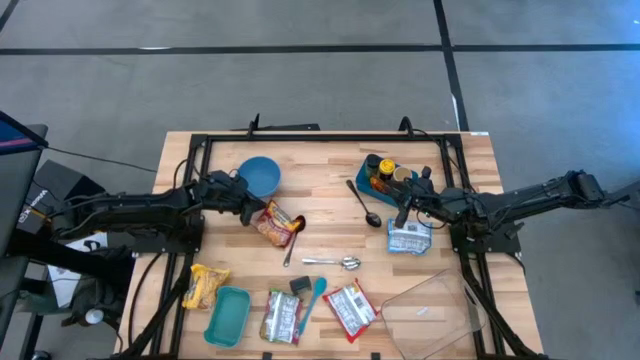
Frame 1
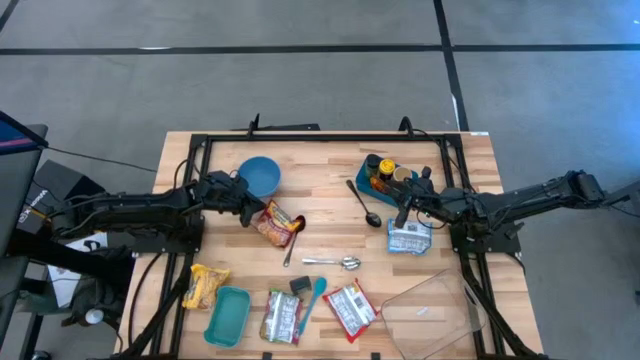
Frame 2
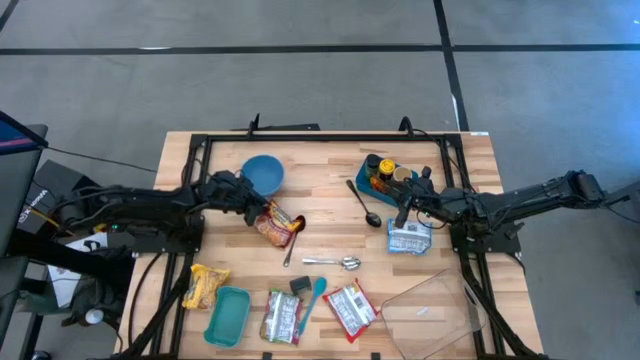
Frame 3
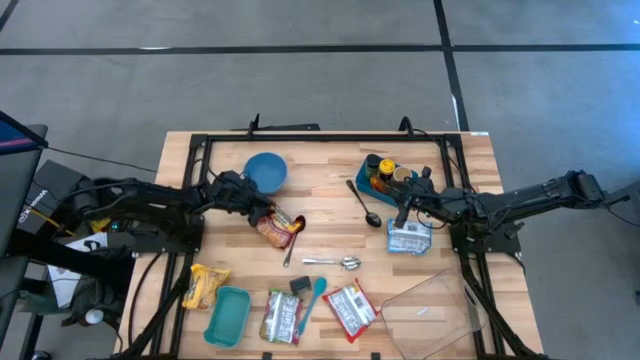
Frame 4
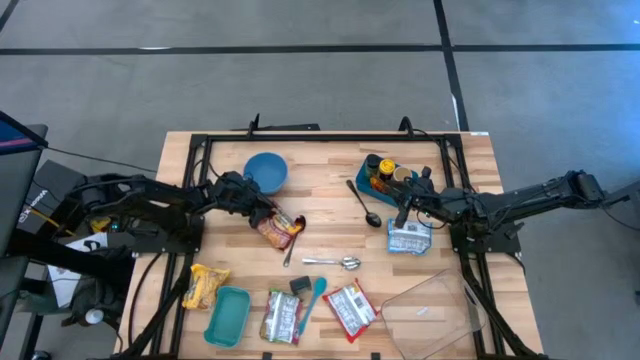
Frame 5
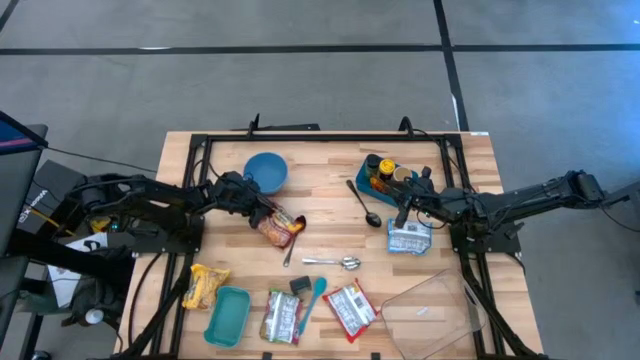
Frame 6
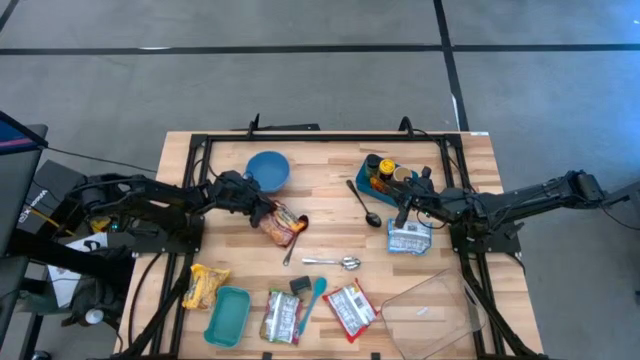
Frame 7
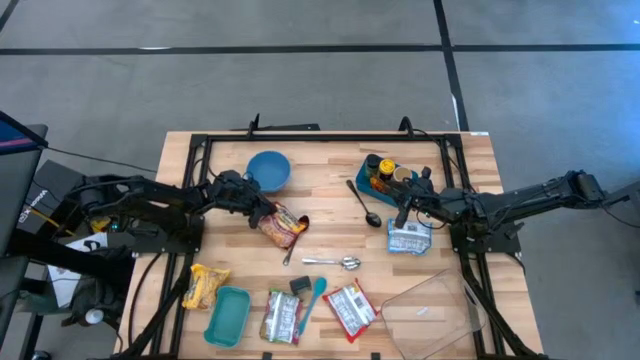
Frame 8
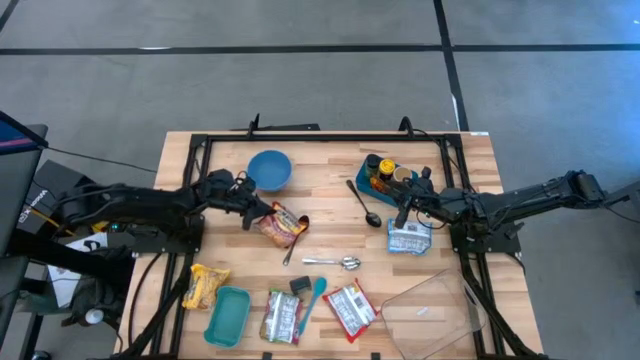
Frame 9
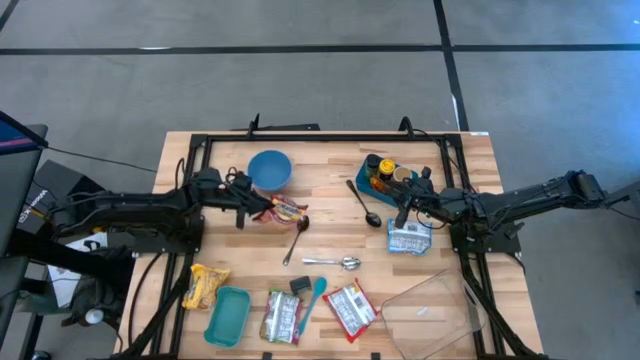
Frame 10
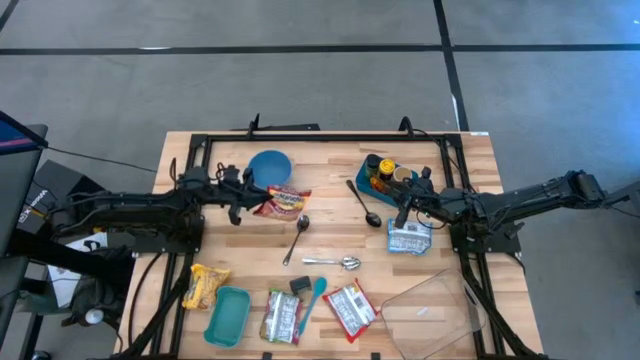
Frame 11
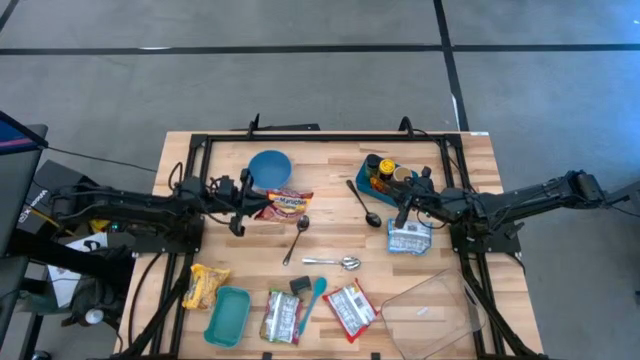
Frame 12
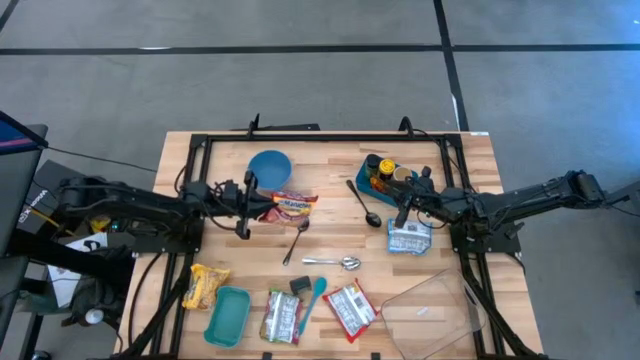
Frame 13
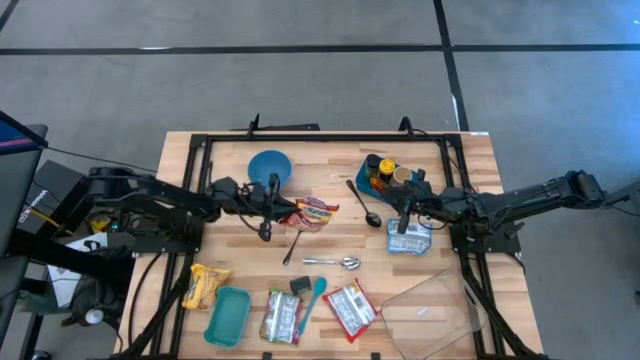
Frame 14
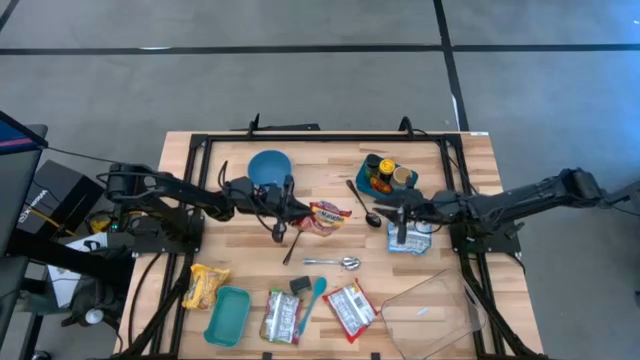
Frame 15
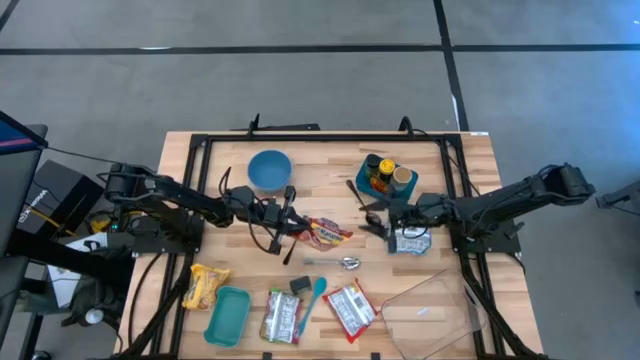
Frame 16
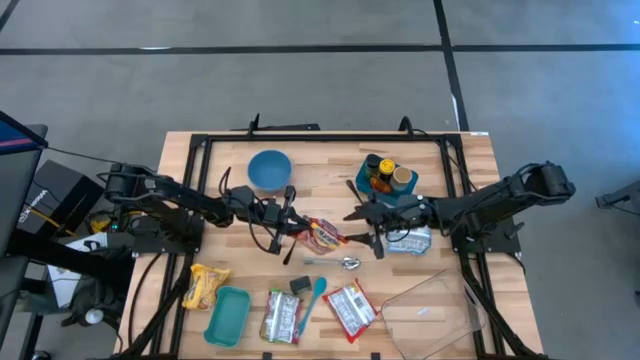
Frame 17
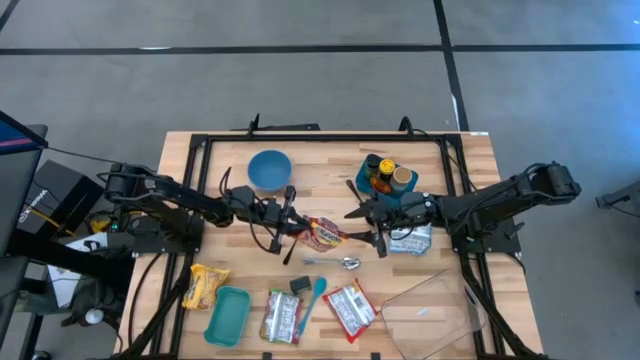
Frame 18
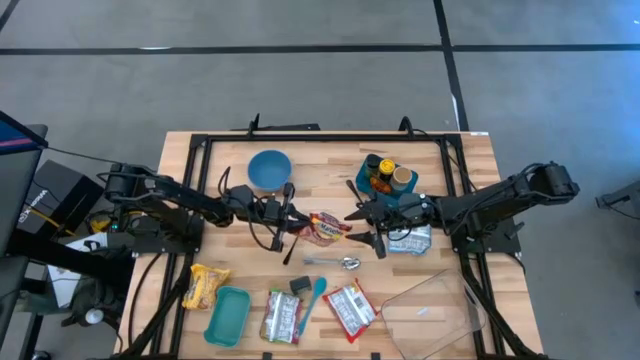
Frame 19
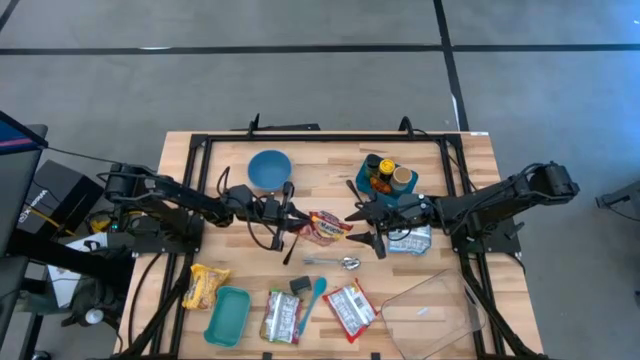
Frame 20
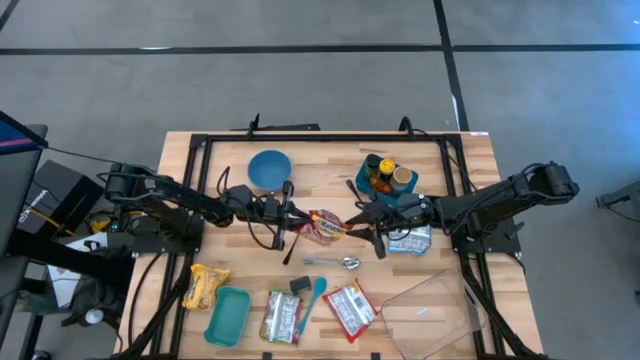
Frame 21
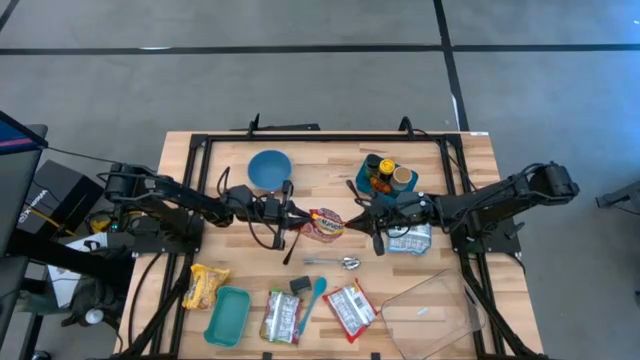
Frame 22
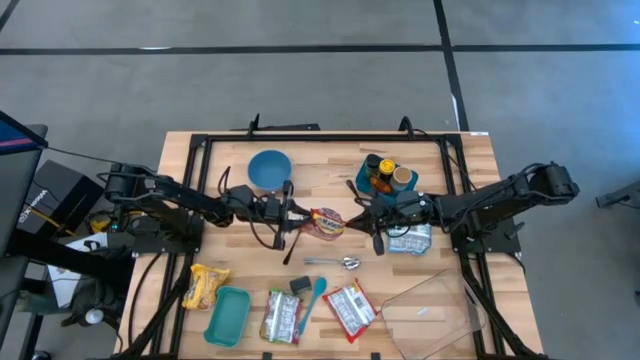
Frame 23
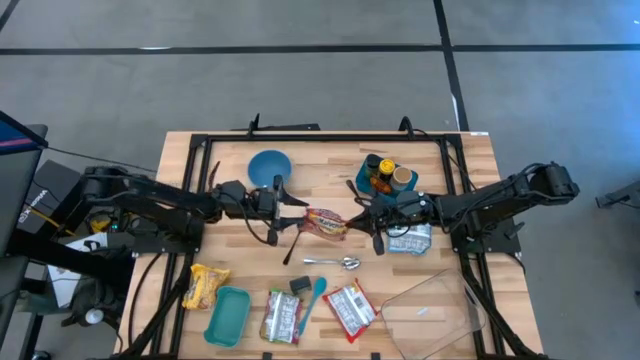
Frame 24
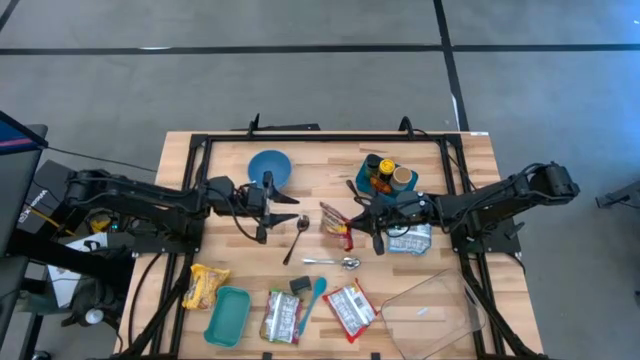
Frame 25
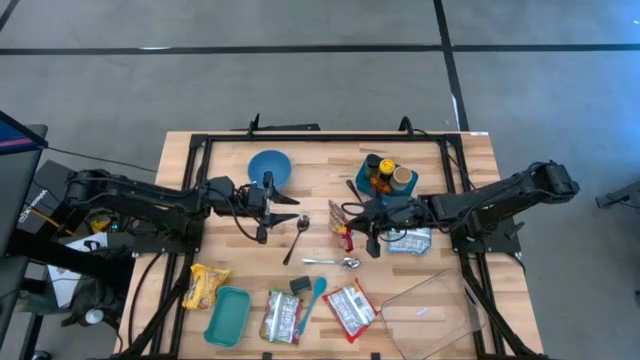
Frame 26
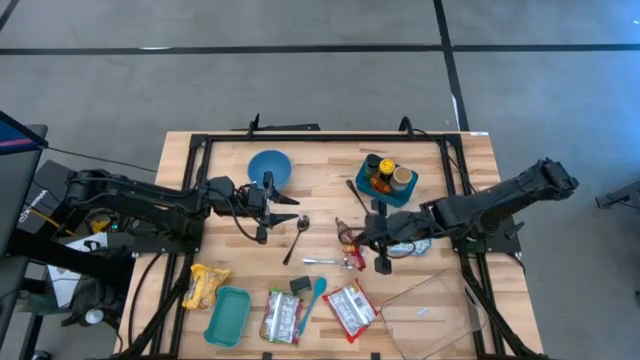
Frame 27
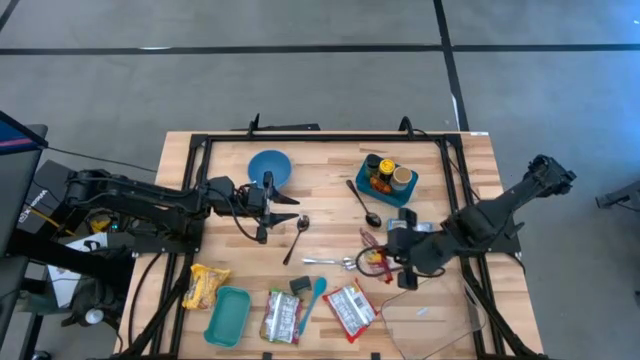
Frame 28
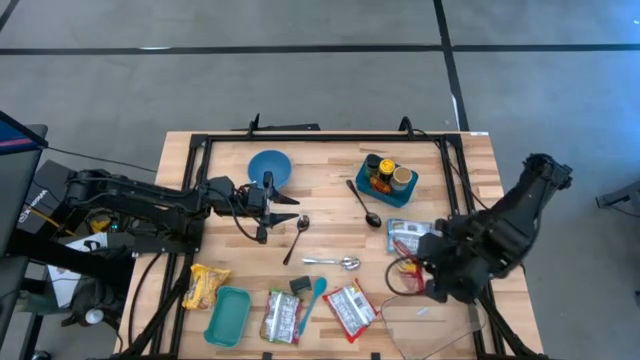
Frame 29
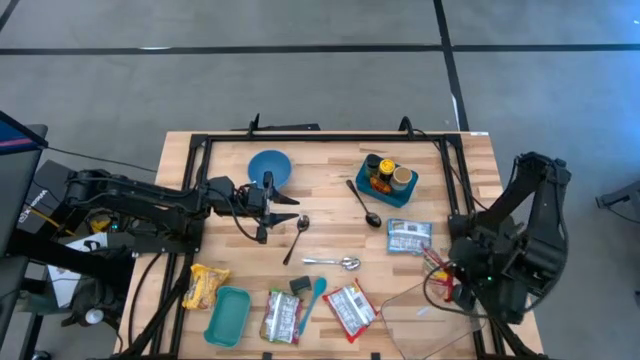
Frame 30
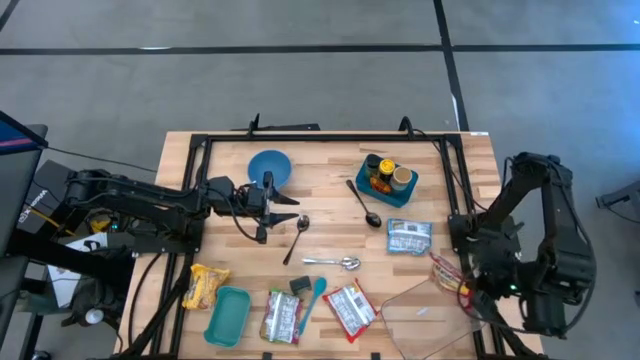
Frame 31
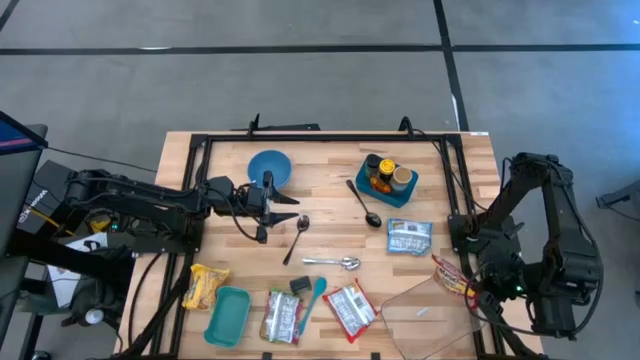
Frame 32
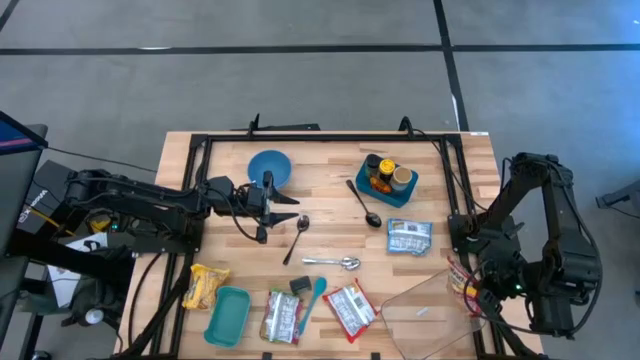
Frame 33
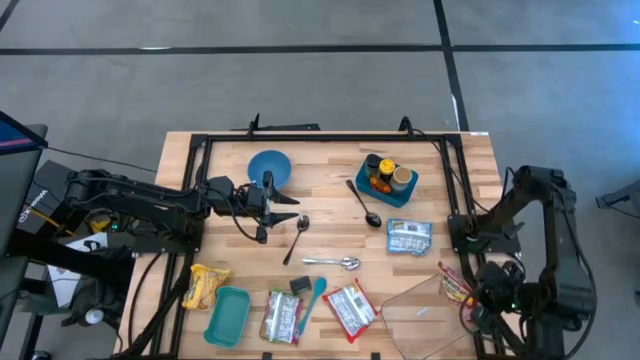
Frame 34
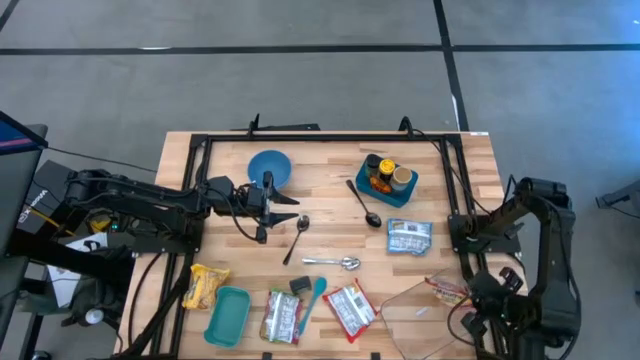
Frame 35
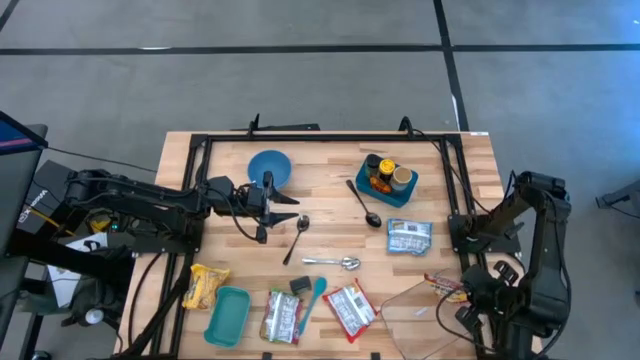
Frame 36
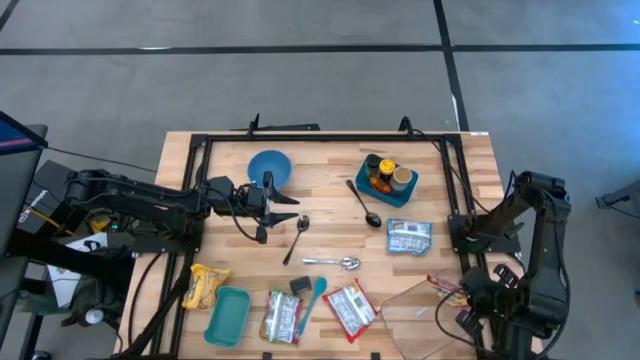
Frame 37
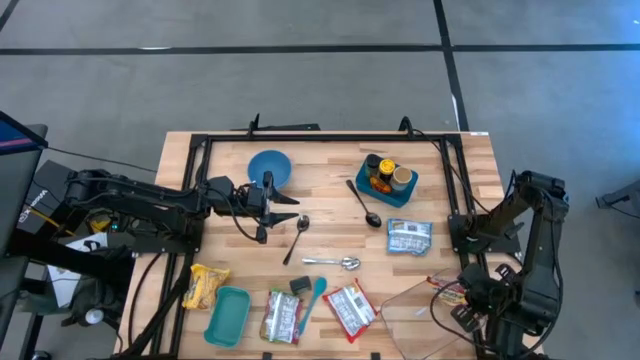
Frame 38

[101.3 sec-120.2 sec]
Task: Pick & Place Food Item
Put the top red noodle pack into the transparent bin

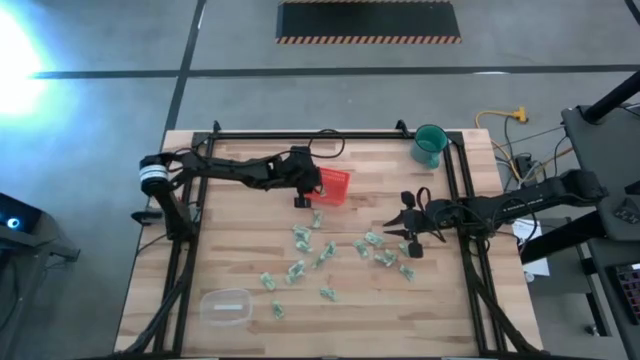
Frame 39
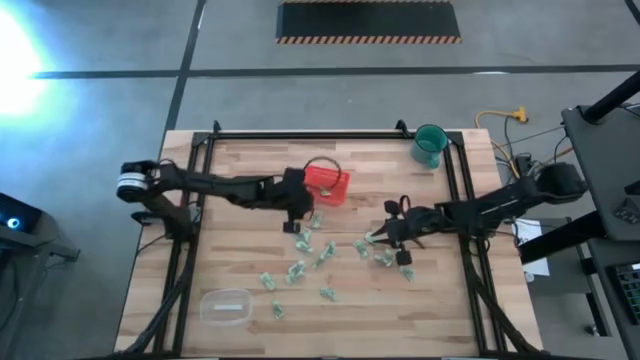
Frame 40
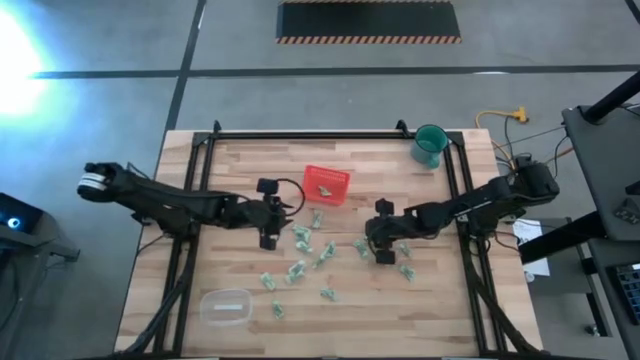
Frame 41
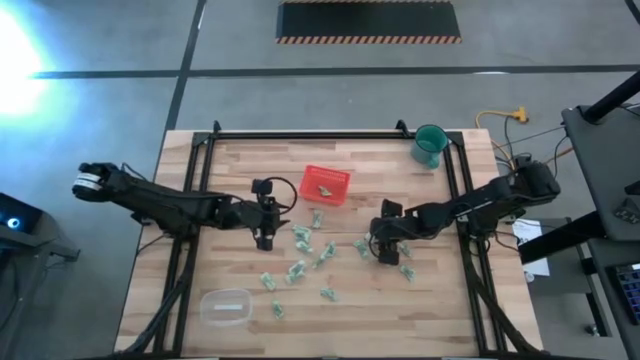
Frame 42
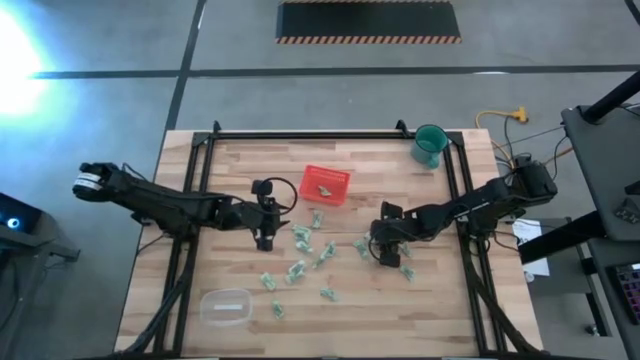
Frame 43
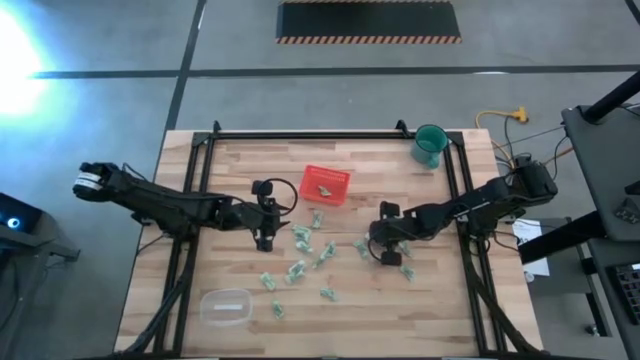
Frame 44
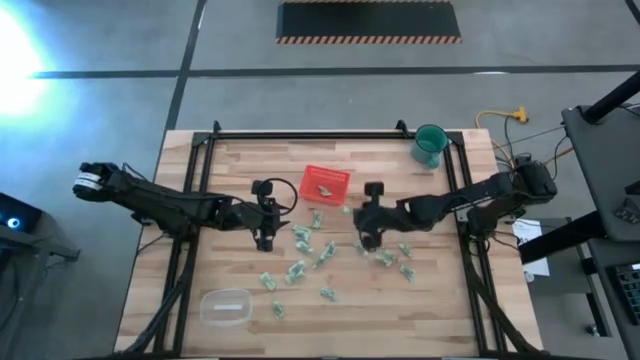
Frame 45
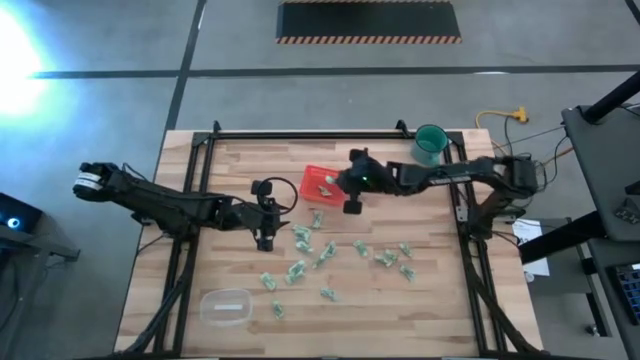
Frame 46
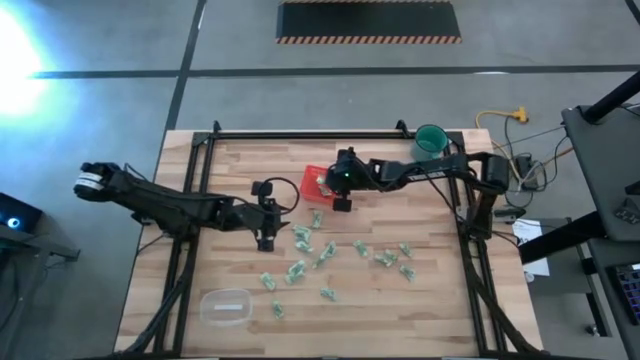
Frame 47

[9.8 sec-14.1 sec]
Task: Pick and place items into bin
Put the stevia packet into the orange bin
